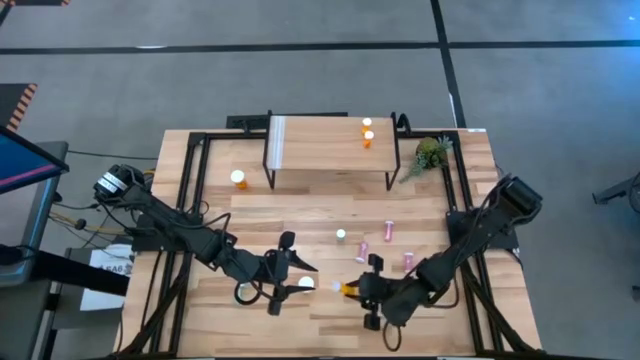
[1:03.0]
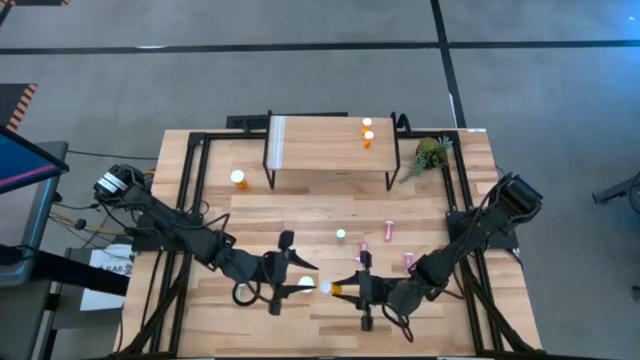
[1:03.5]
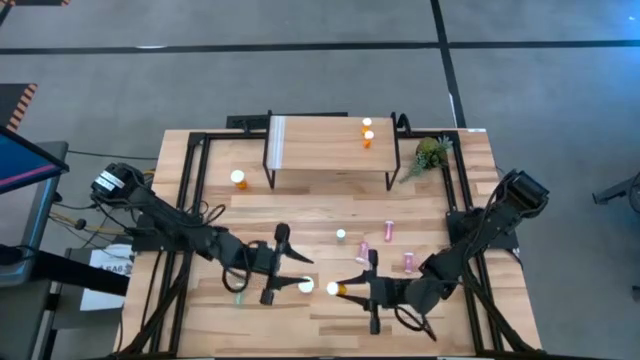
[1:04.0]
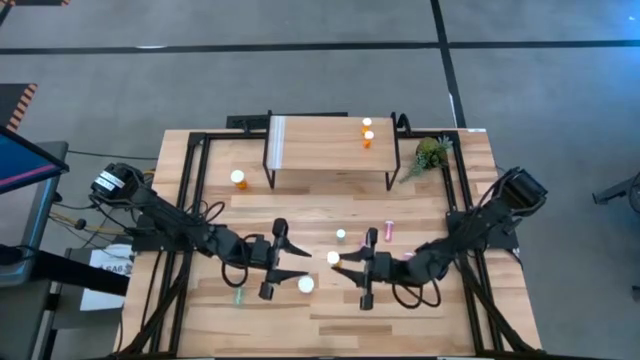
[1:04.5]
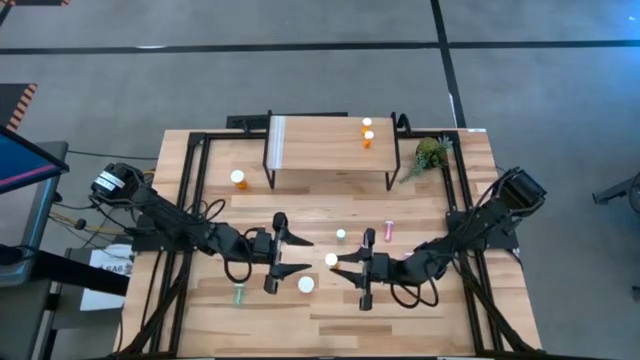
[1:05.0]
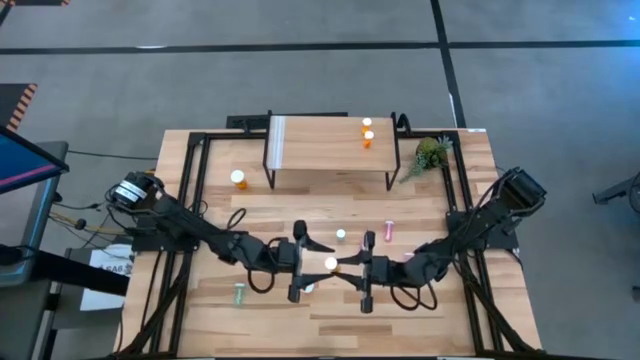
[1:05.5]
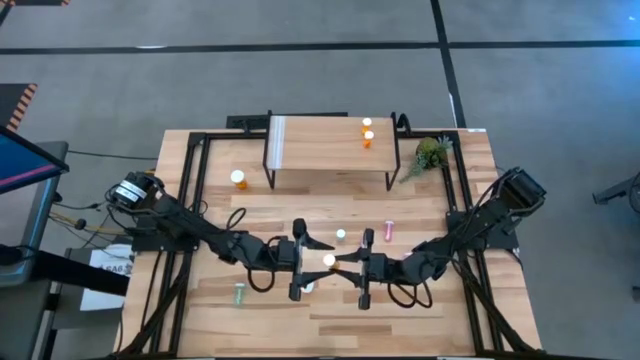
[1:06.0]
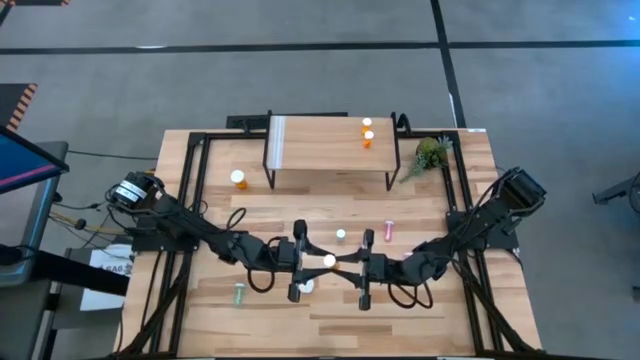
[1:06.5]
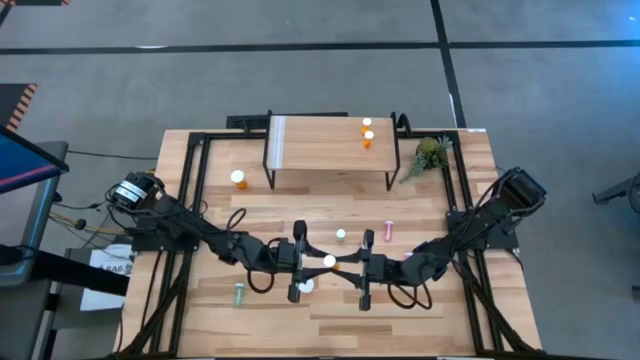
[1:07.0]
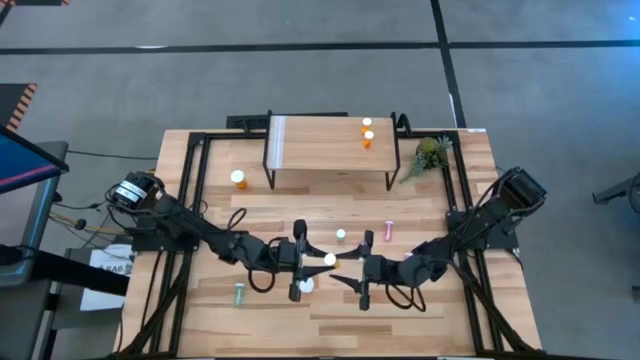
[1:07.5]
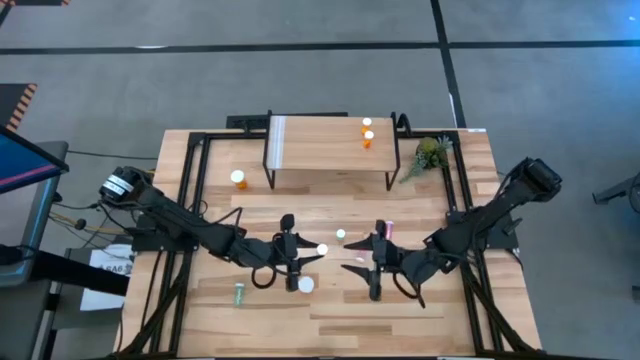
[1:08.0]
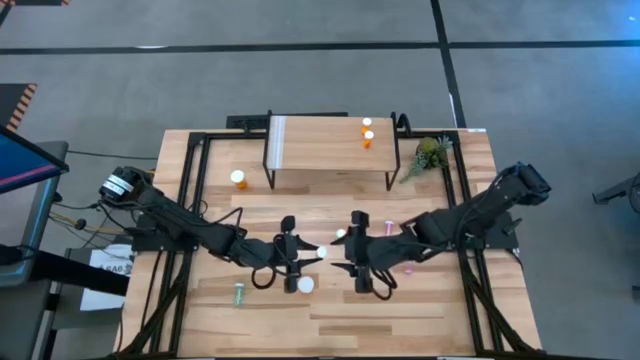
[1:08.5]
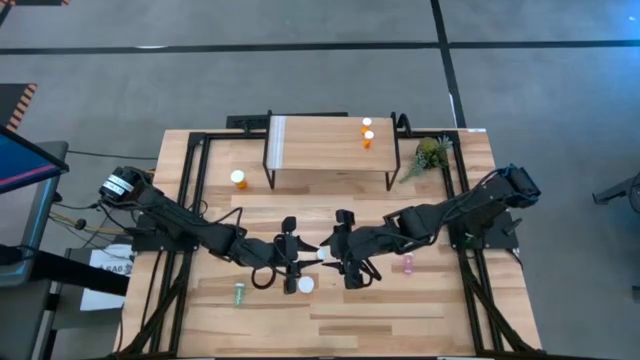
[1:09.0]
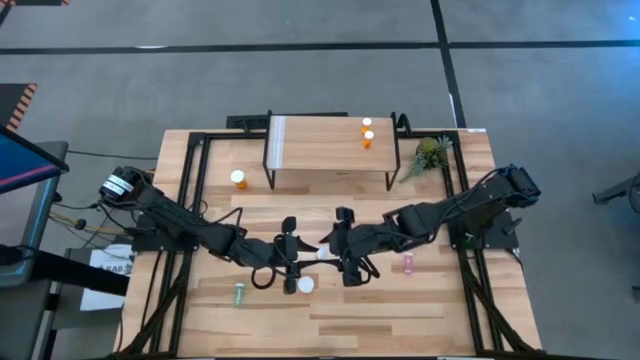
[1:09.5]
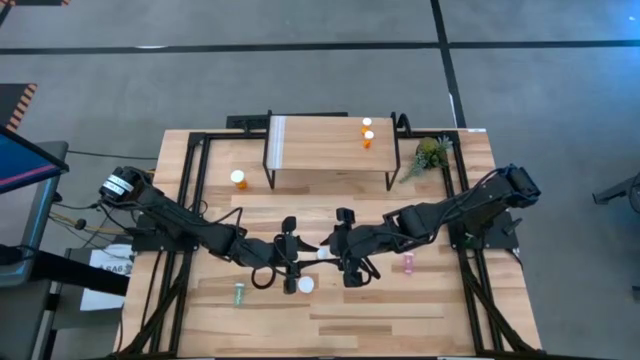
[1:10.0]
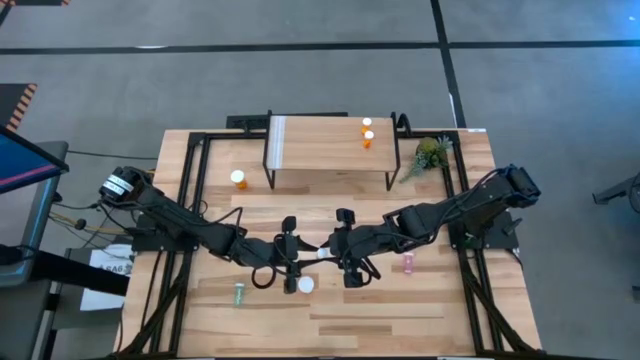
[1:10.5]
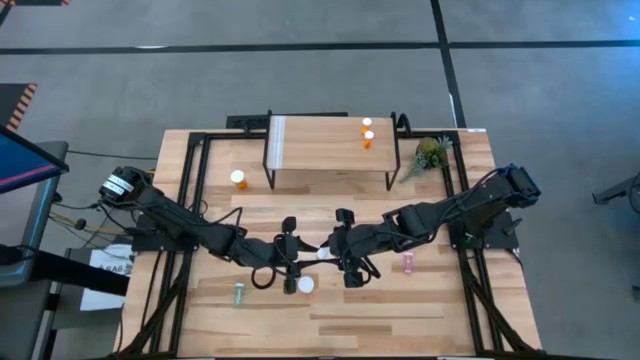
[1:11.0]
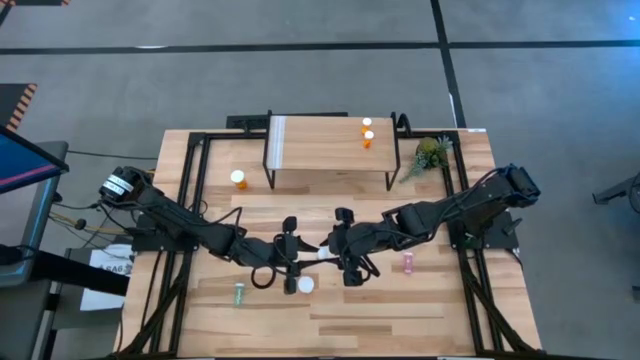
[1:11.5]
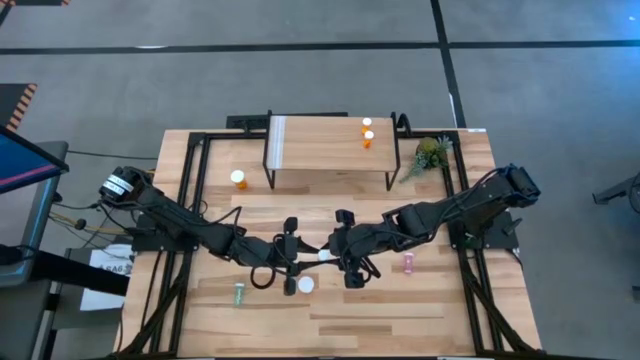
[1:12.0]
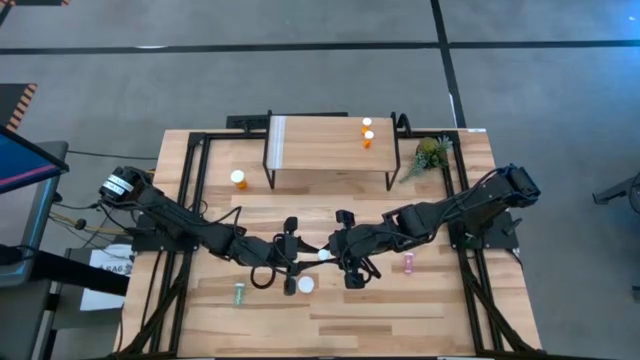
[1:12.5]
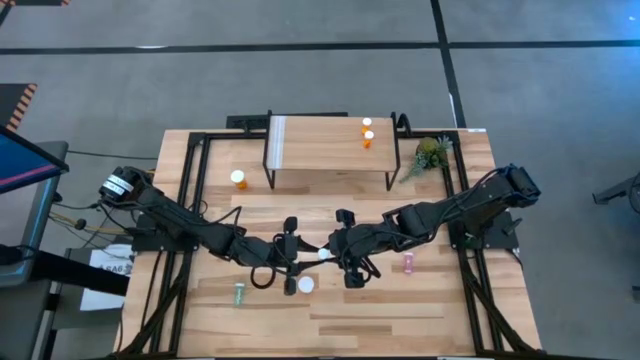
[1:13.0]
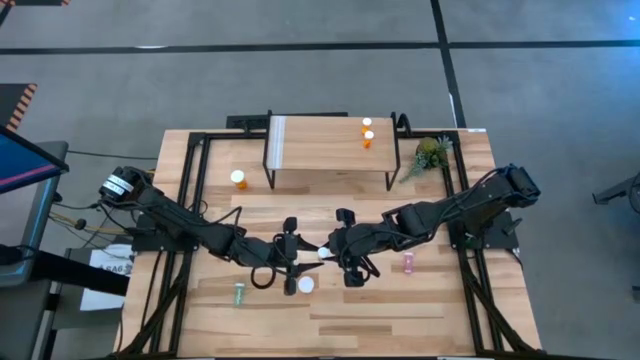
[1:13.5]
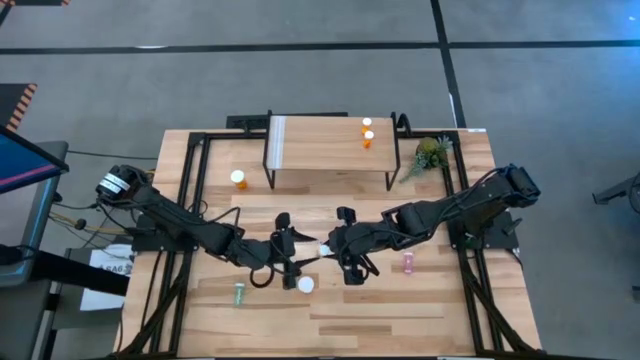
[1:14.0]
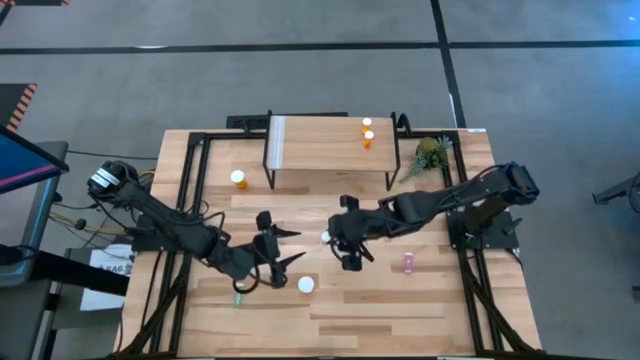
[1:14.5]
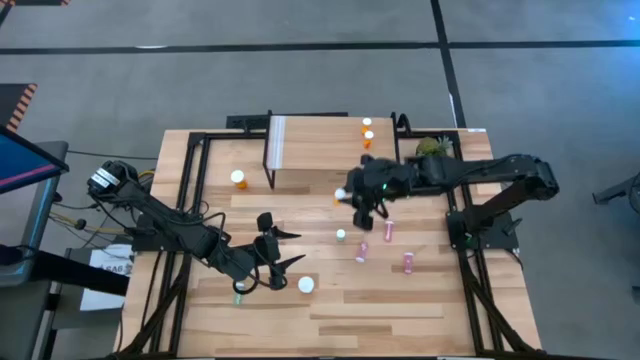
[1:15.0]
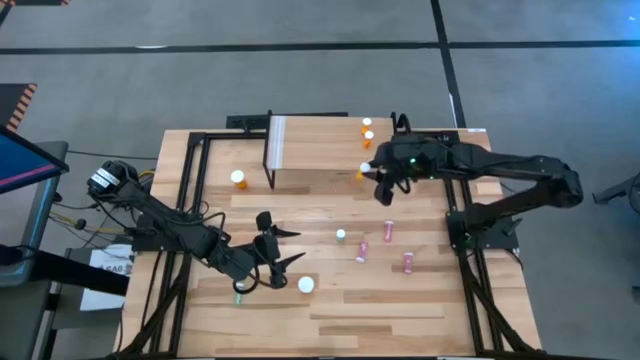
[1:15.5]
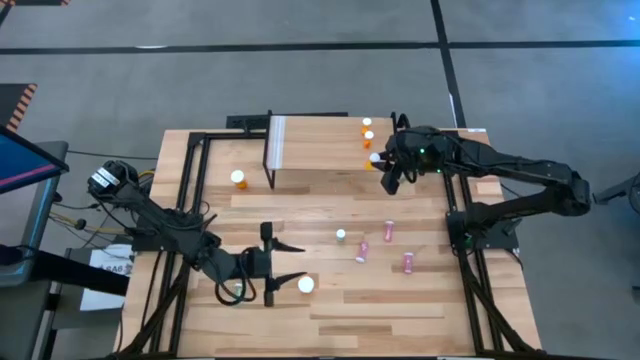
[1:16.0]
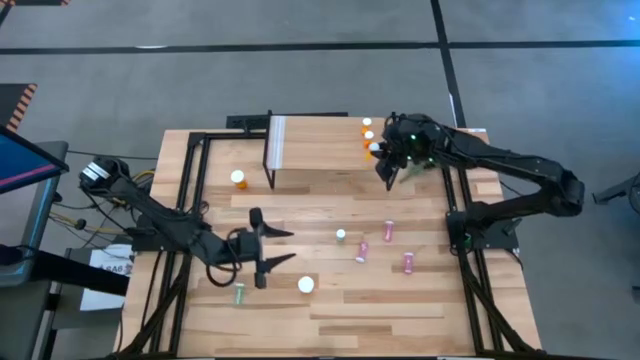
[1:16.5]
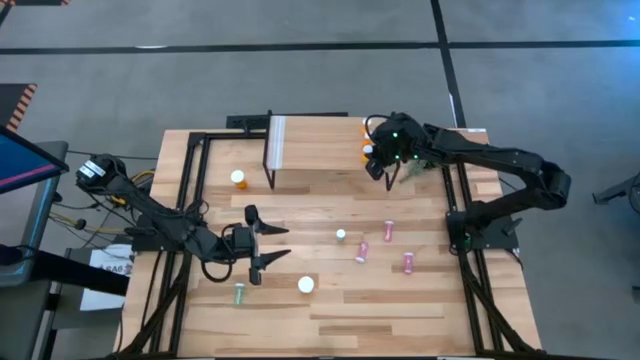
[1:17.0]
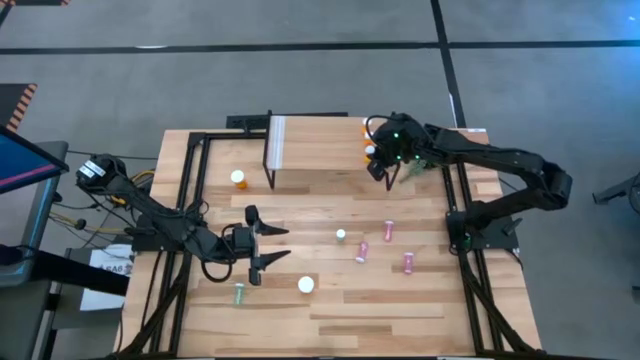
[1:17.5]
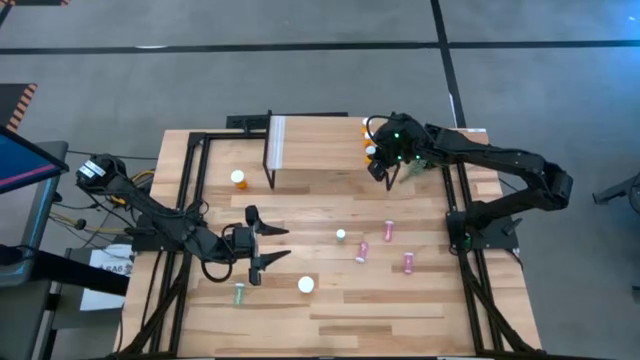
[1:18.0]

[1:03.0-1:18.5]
Task: Pick and place medicine bottles onto shelf by color
Put the small orange pill bottle on the shelf aligned with the small orange pill bottles

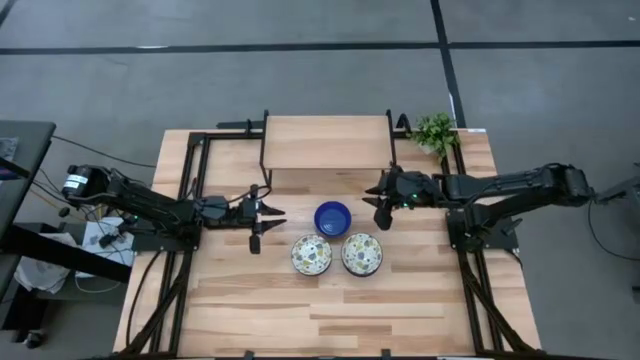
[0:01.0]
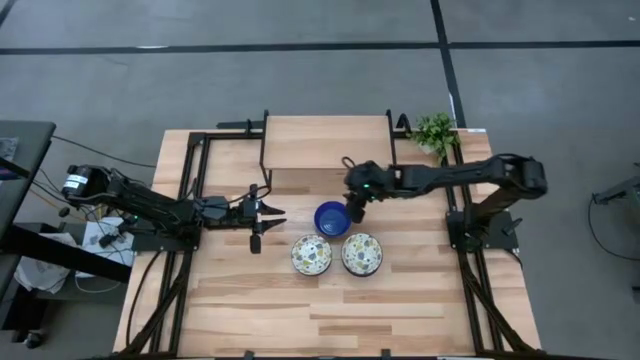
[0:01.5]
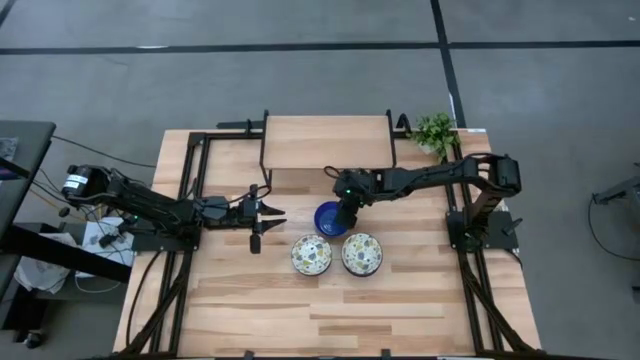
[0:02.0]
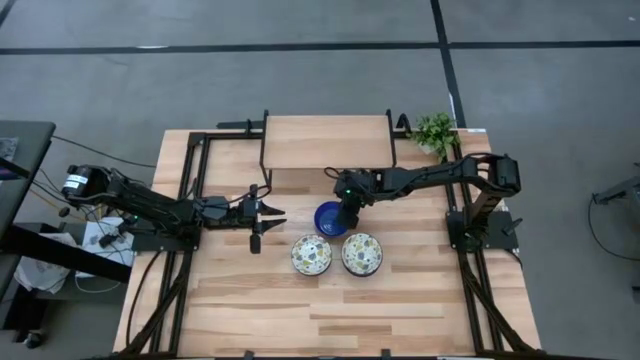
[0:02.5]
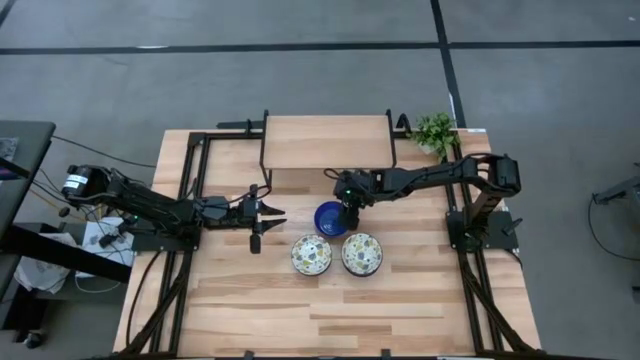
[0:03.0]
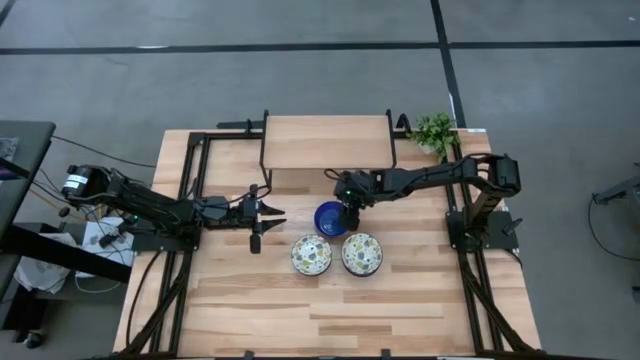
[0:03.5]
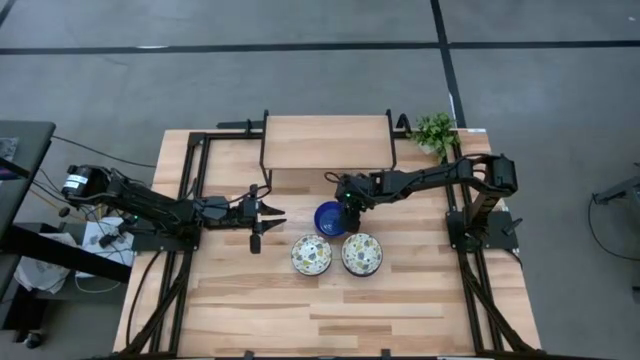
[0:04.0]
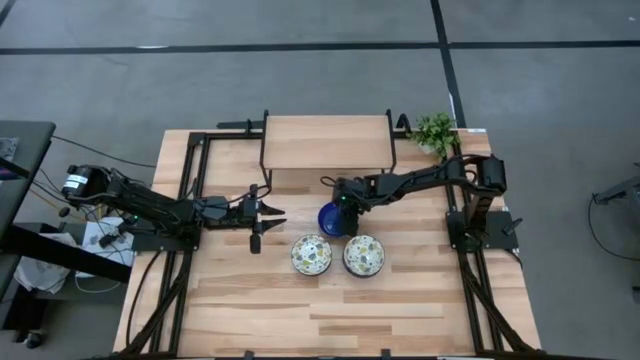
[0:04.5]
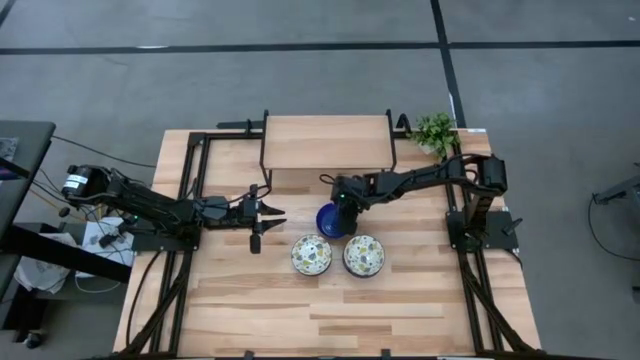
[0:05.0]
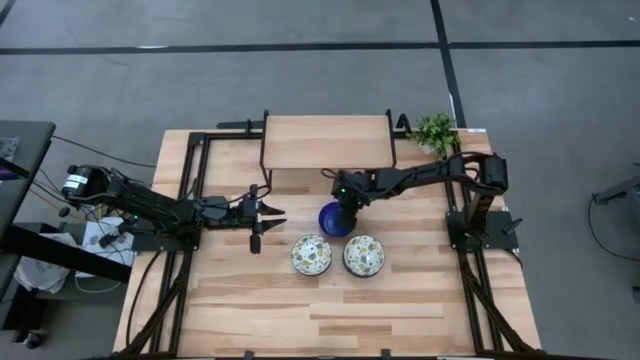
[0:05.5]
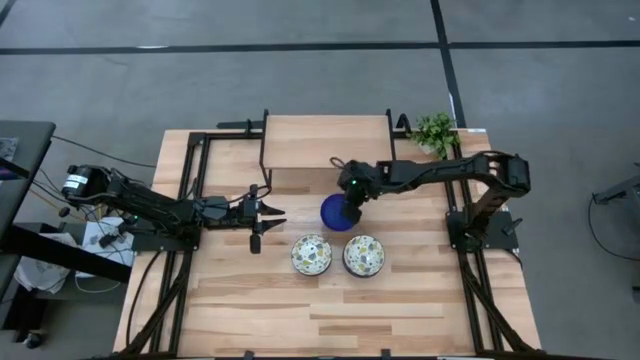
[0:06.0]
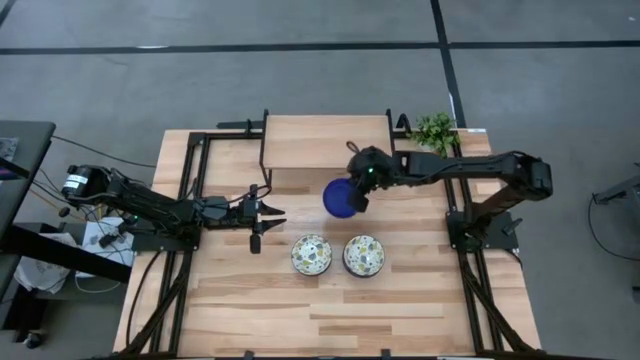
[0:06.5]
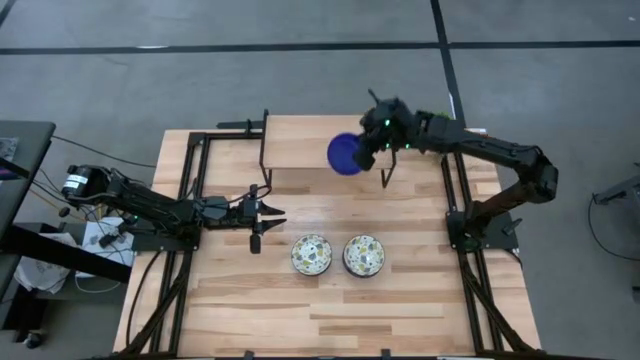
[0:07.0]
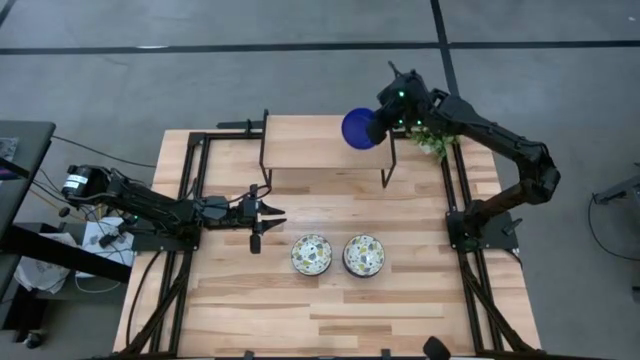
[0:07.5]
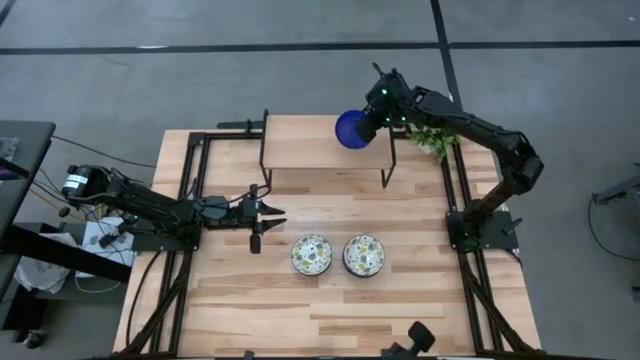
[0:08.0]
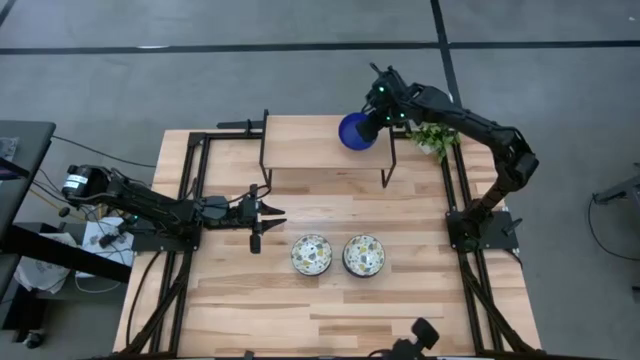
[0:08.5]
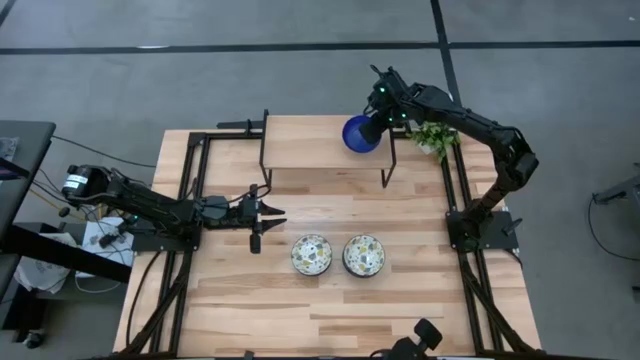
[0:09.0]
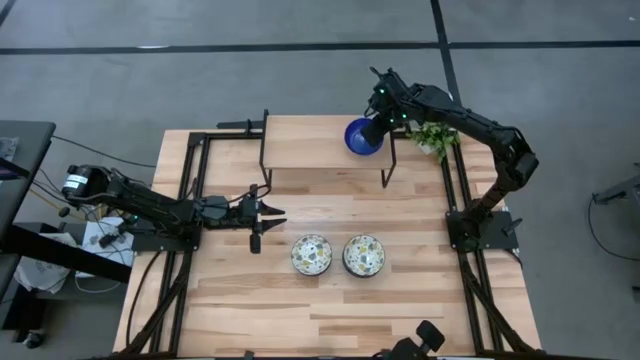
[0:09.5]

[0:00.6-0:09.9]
Task: Pick & Place Mini bowls
Put the blue bowl on the shelf
